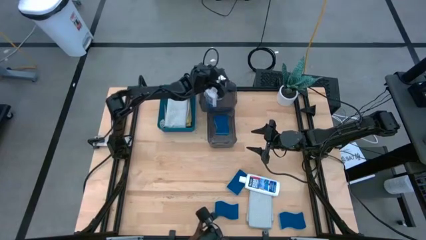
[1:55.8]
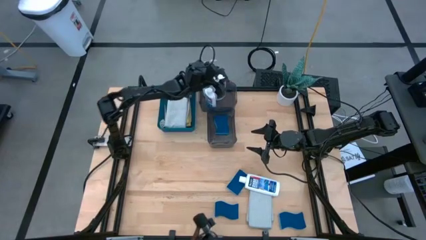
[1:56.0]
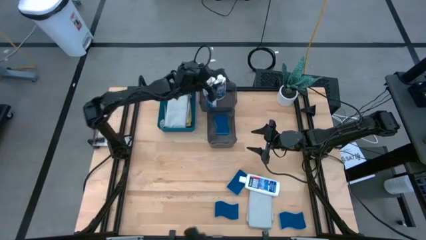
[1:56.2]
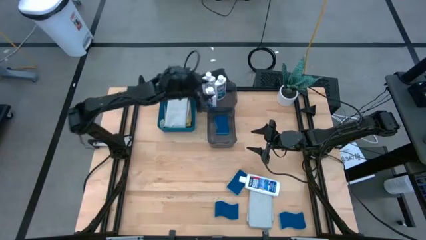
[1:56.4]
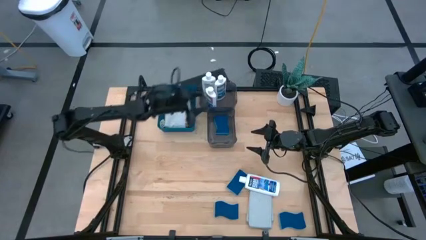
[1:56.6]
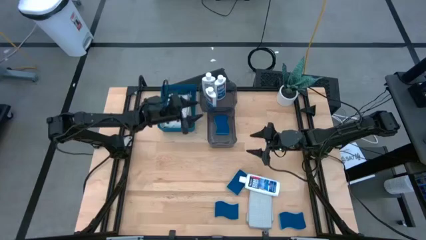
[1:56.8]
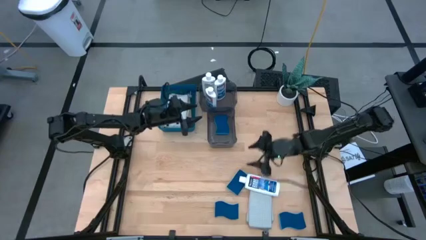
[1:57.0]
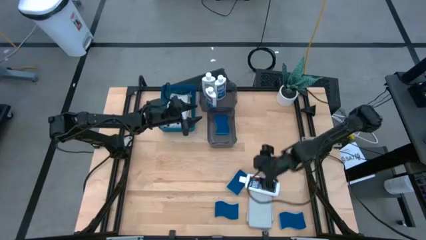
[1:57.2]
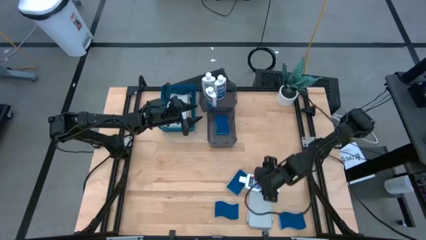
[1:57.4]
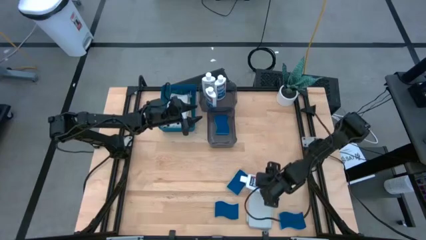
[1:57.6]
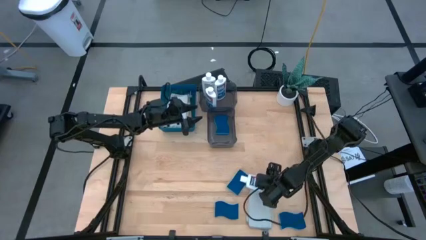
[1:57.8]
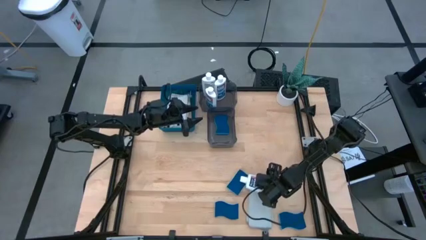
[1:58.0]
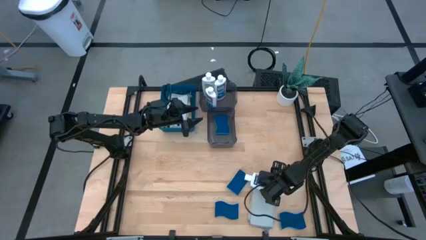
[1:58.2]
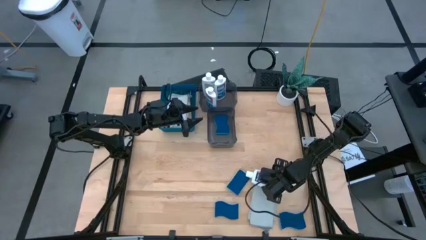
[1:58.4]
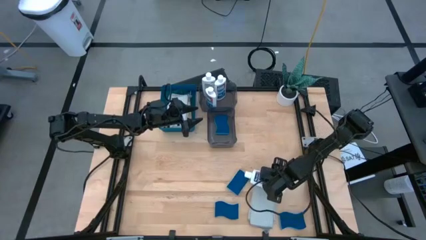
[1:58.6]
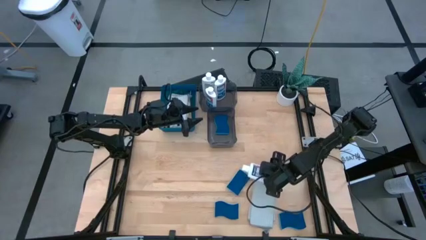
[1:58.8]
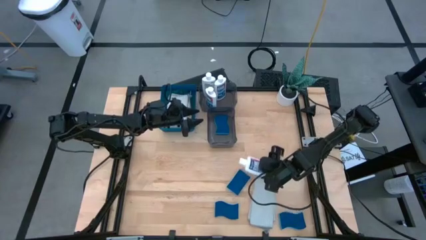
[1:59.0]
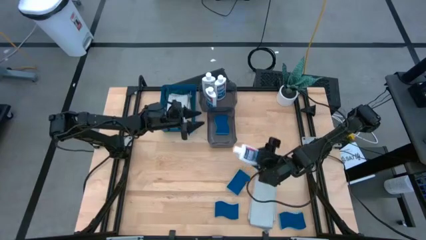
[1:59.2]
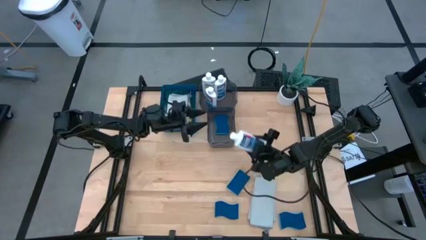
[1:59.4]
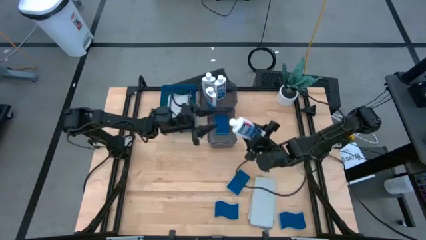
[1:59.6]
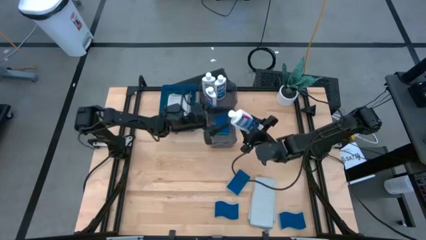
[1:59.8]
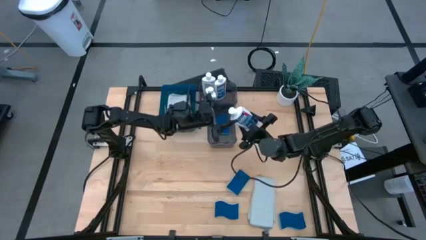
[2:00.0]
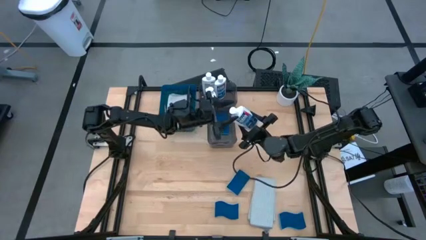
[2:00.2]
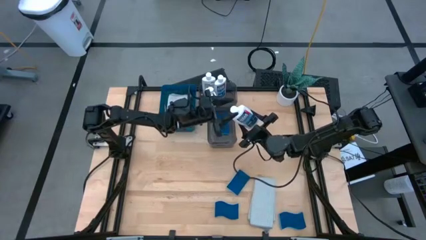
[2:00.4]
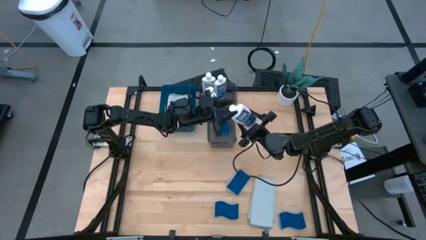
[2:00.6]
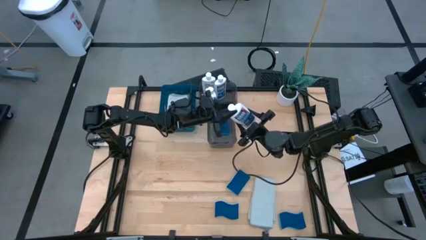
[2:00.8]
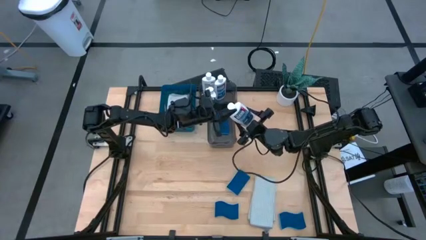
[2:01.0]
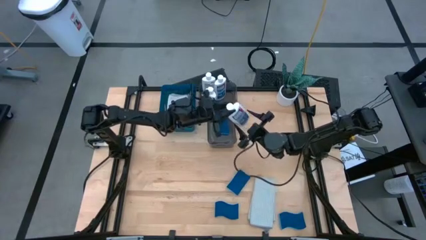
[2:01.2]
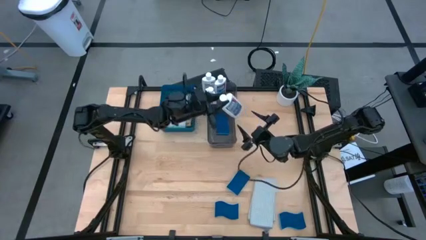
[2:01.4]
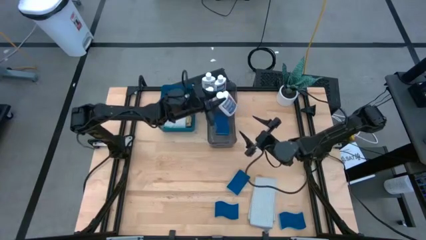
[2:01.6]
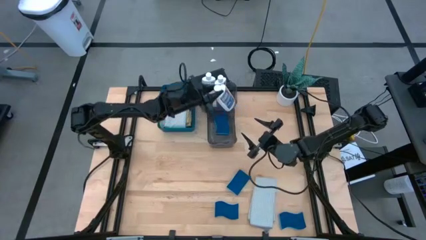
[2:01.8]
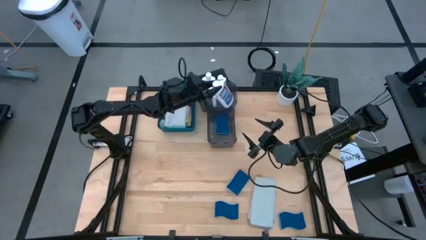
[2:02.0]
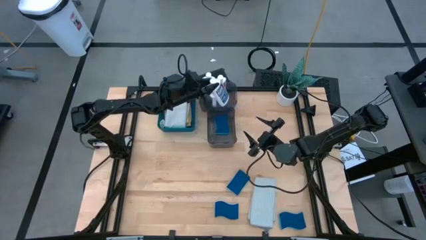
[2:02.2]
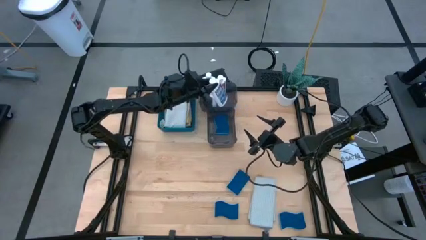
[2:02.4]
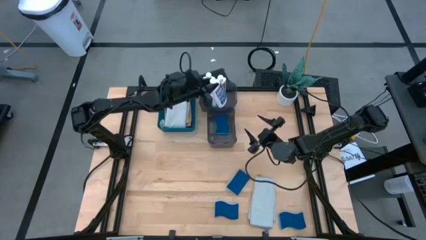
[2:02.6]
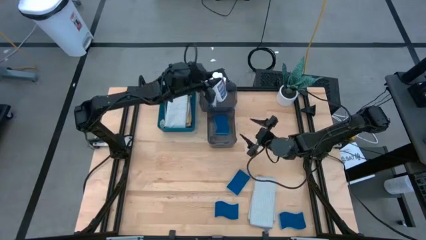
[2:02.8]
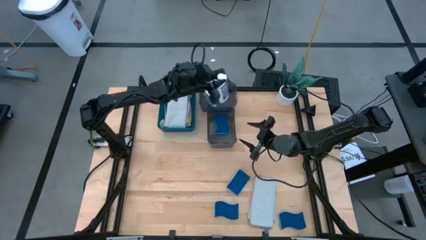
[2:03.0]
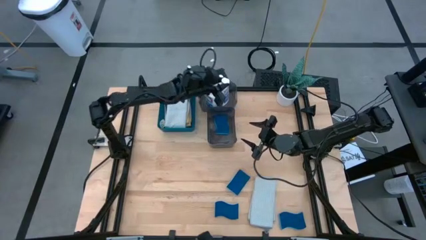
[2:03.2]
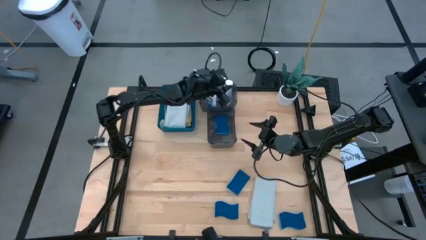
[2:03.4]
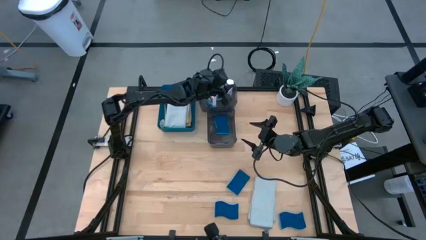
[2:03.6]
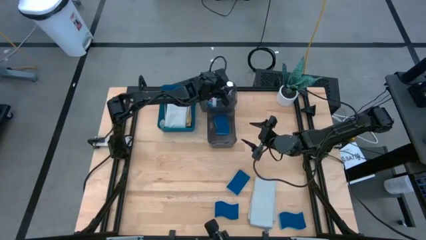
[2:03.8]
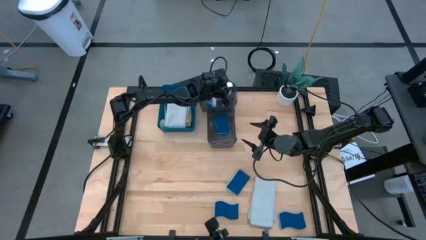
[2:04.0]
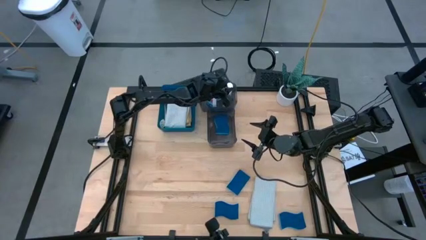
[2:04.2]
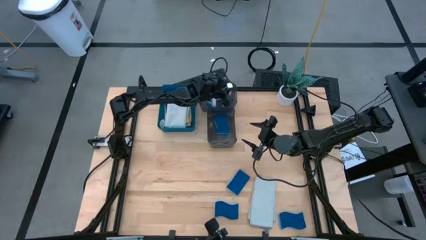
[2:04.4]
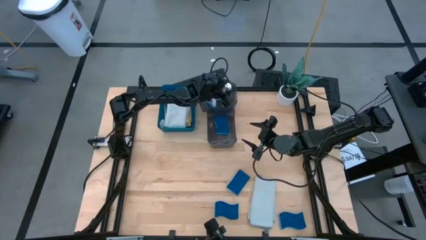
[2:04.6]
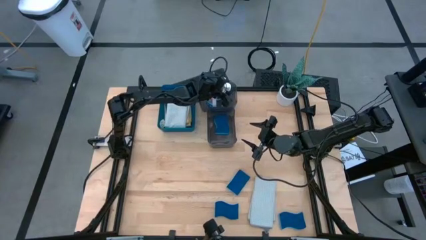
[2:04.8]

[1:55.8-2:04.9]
Task: Pick & Place Kitchen Items
Put the white plastic restorer bottle into the top black bin

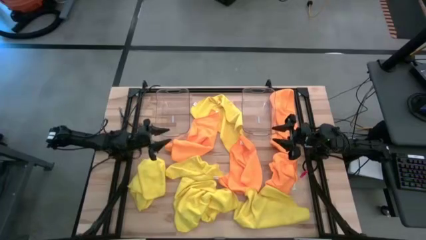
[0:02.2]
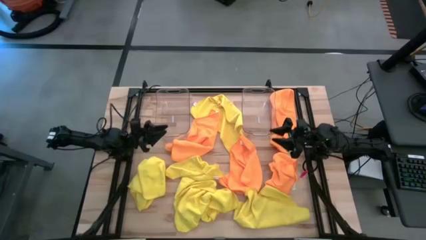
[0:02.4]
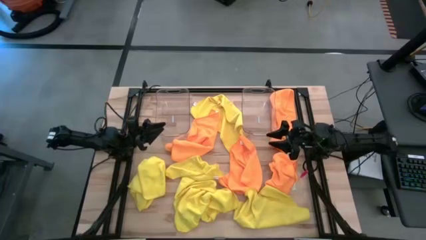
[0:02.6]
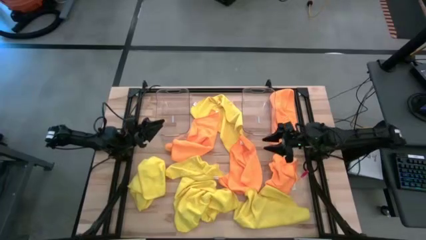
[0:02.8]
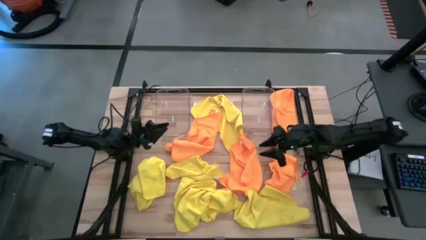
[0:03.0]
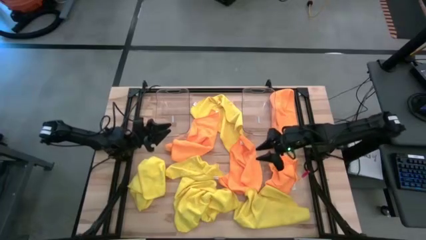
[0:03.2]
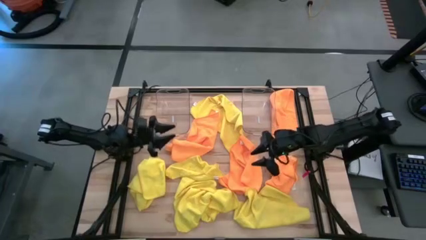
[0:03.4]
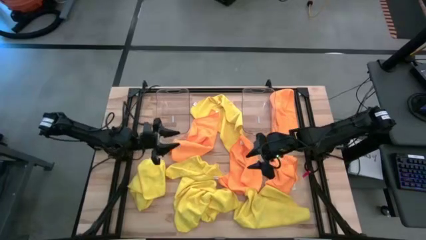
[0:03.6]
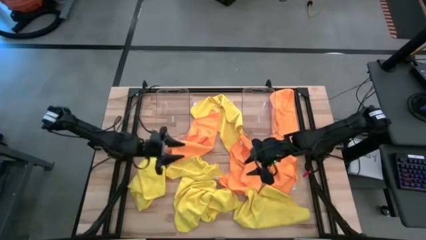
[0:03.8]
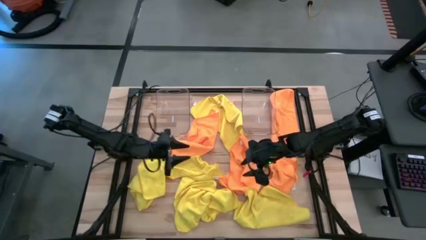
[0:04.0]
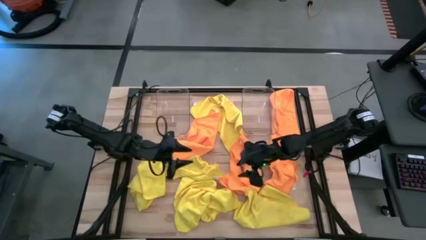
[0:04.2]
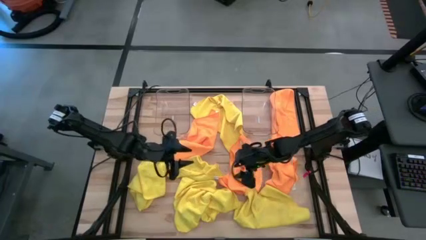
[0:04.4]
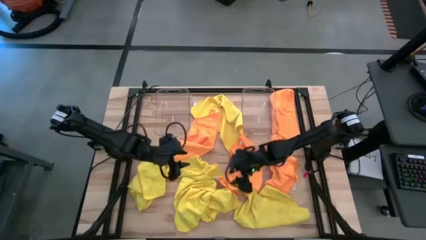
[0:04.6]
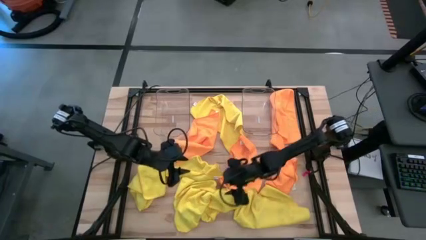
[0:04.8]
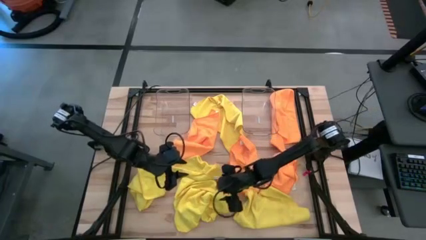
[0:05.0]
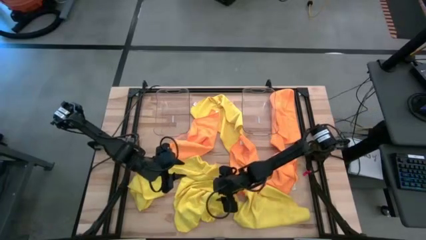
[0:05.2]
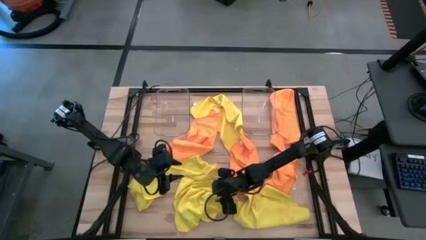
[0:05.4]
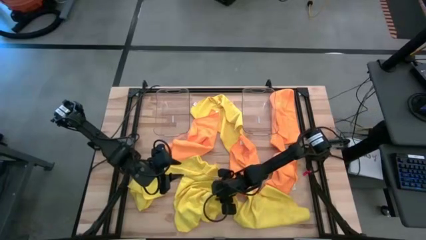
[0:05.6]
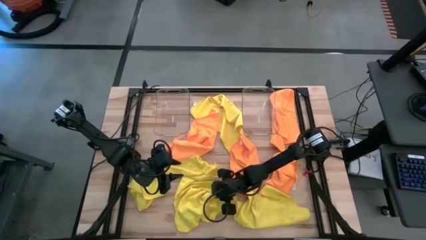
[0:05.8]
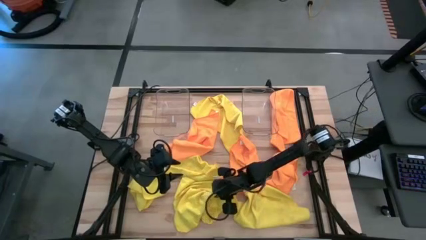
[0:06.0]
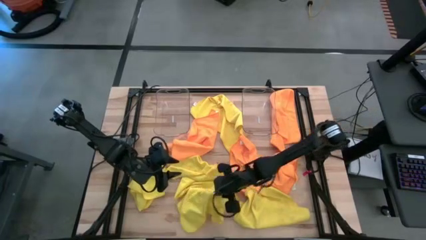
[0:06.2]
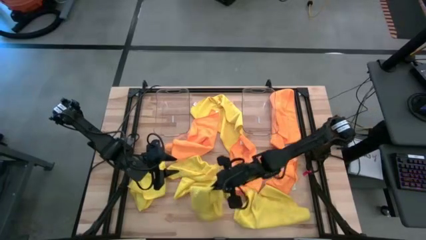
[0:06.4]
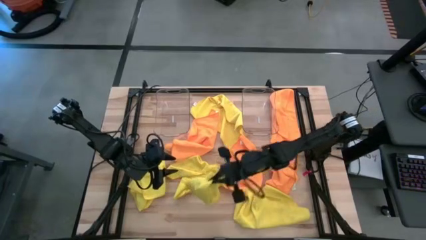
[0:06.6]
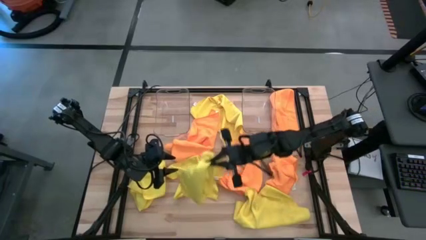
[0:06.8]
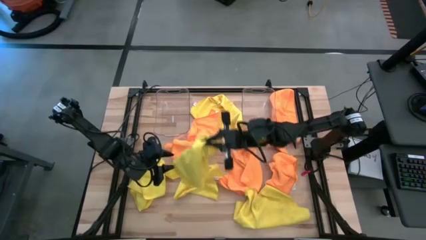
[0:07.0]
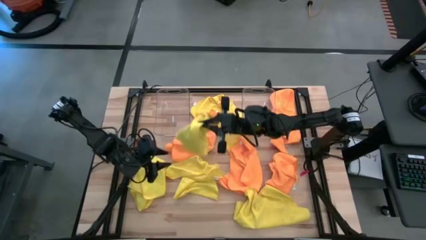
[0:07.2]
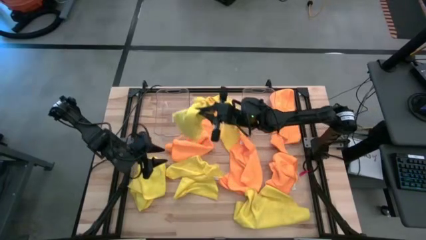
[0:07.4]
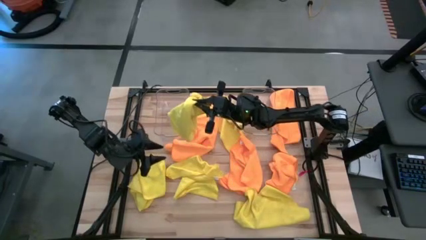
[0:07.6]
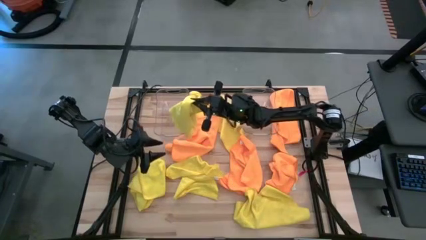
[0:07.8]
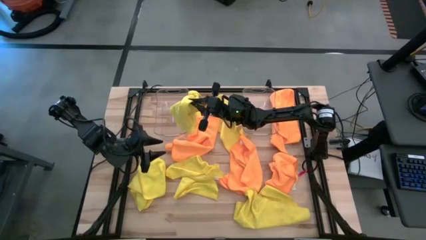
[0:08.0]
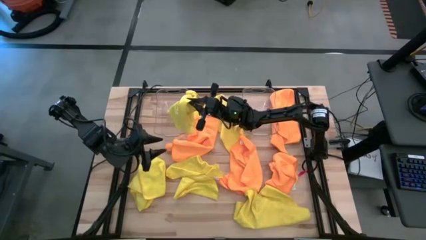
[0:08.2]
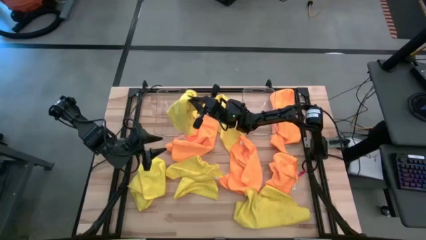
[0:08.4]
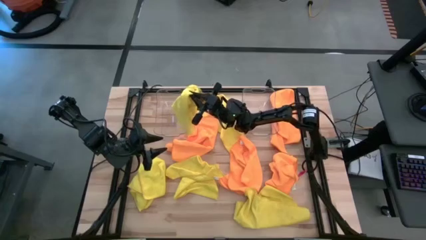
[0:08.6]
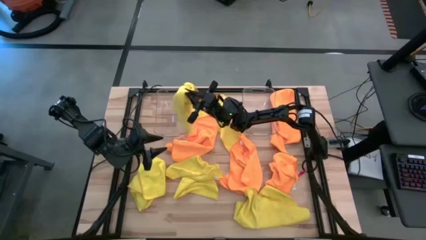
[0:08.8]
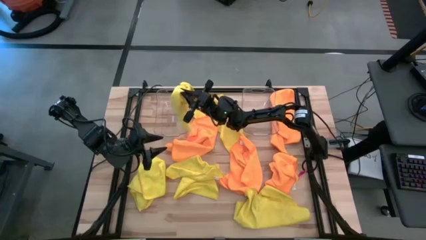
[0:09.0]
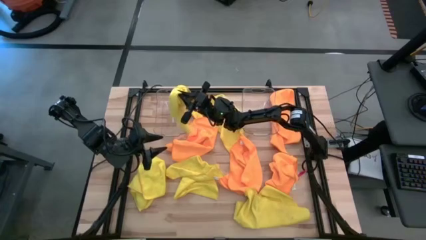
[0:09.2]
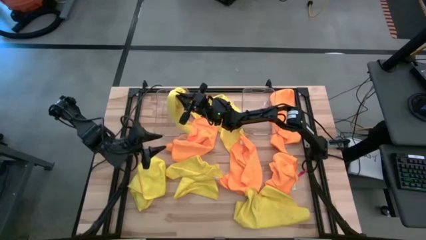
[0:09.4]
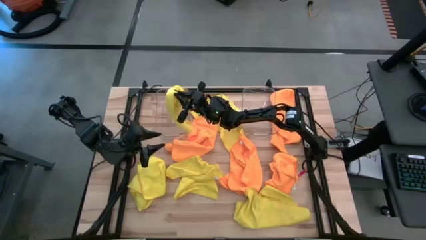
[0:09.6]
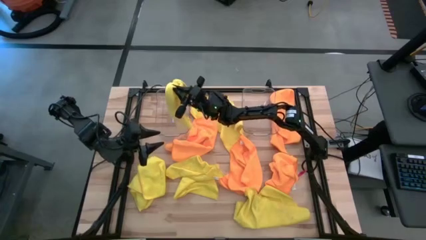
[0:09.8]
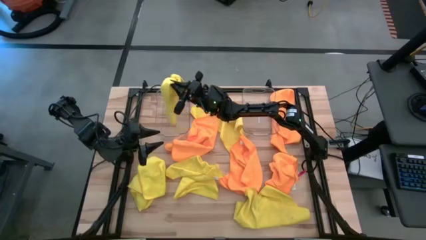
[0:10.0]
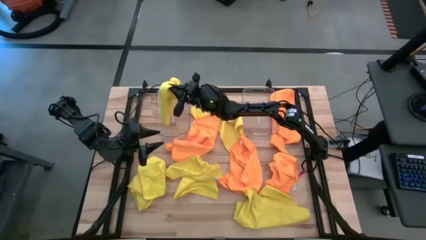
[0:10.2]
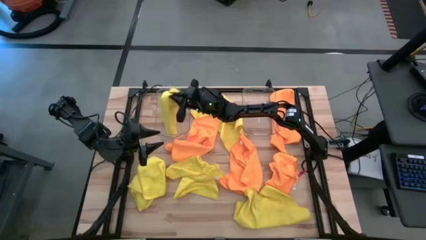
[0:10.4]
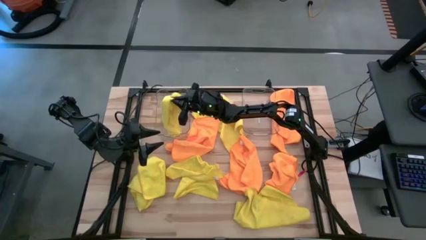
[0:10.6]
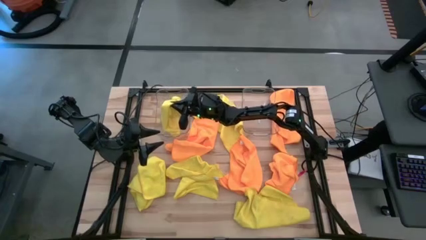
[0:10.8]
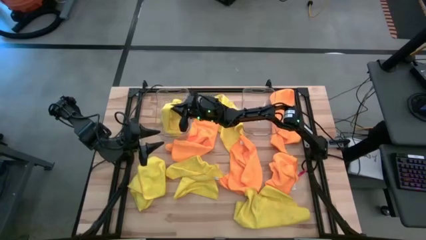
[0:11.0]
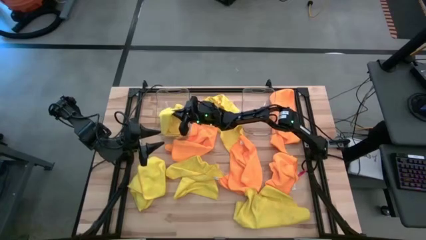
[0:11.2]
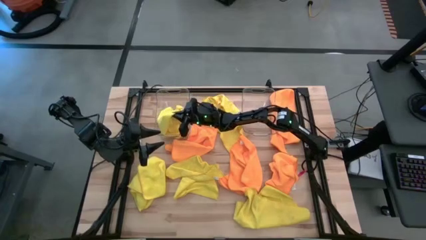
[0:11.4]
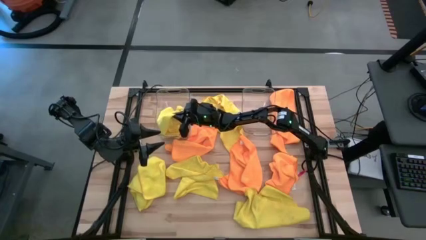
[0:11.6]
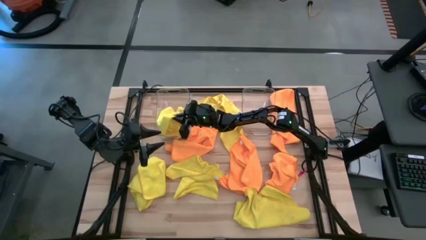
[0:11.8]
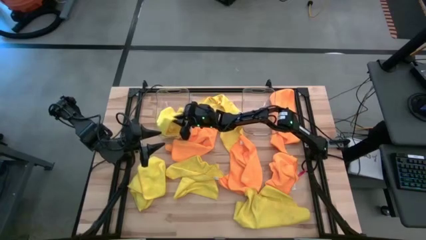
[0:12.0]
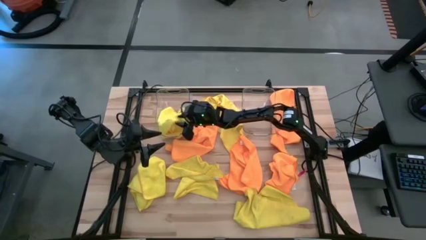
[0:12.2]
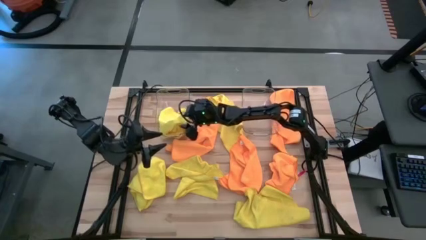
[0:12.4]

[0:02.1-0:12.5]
Task: Sort microfiber towel by color & place in baskets
Put the yellow microfiber cloth into the left transparent bin
